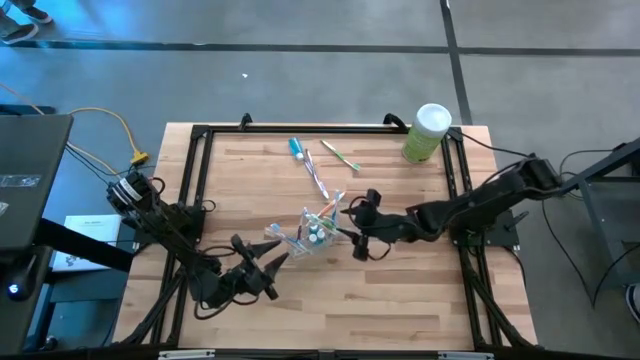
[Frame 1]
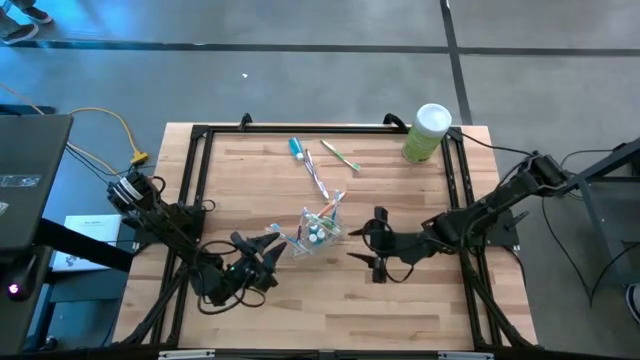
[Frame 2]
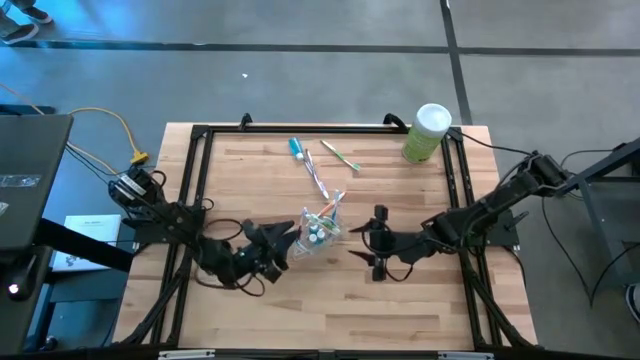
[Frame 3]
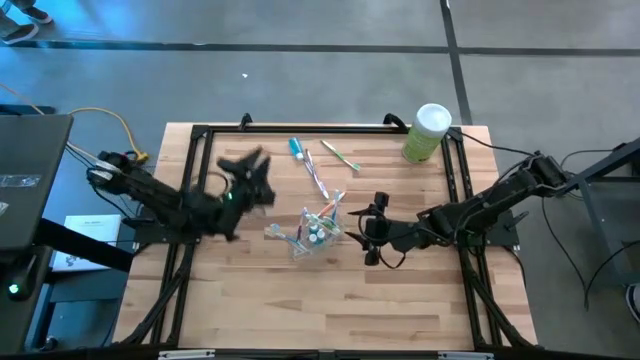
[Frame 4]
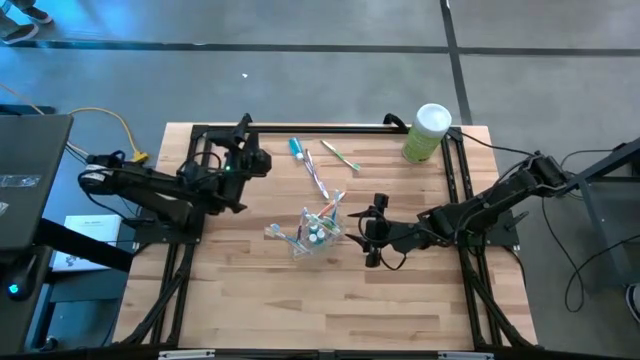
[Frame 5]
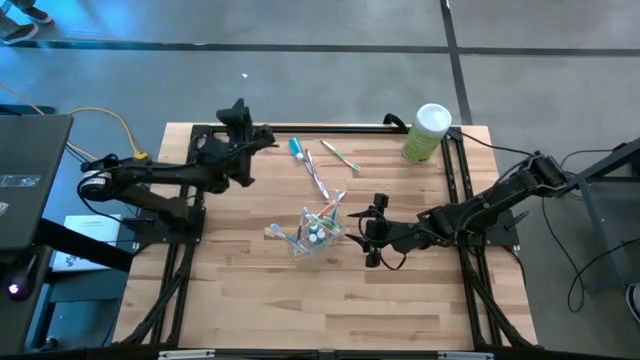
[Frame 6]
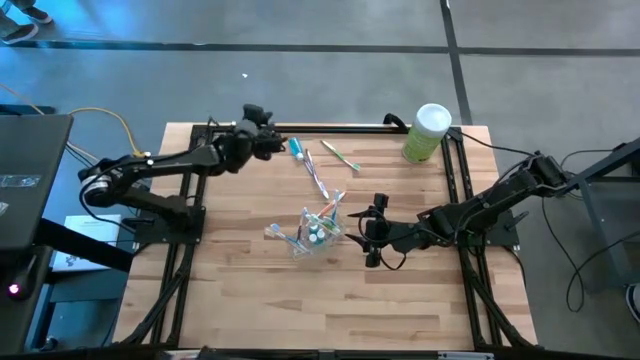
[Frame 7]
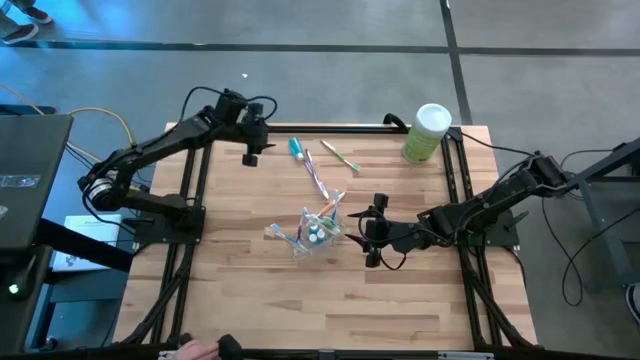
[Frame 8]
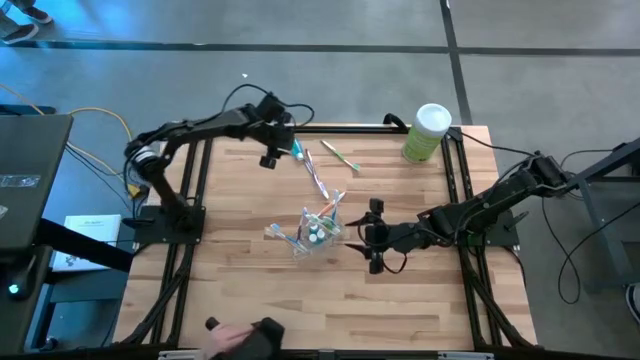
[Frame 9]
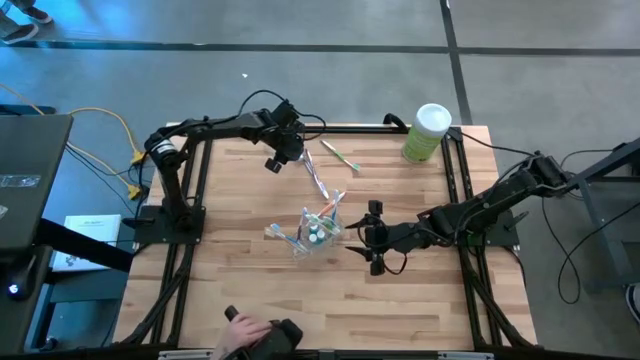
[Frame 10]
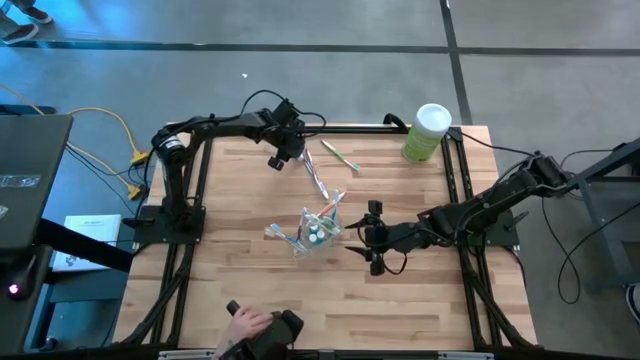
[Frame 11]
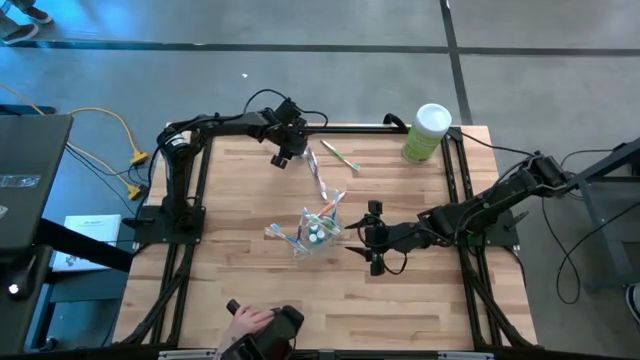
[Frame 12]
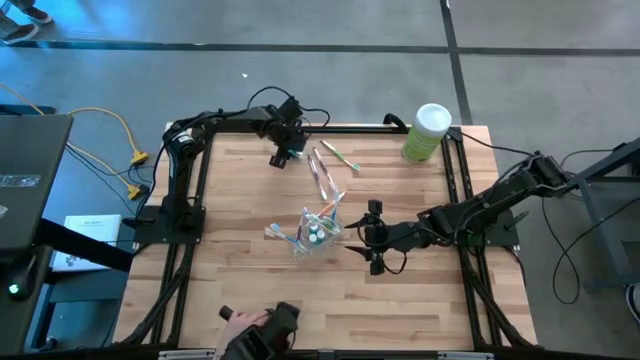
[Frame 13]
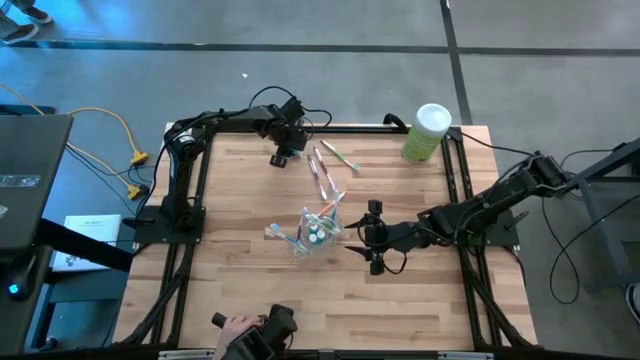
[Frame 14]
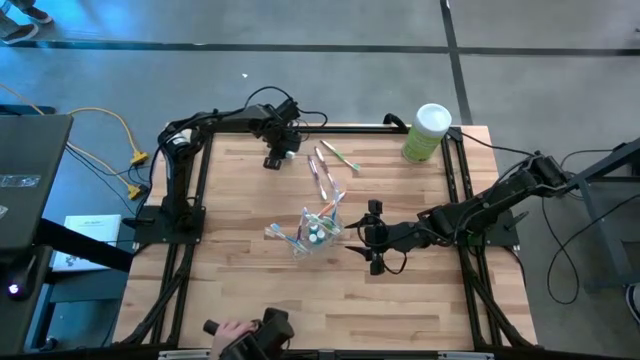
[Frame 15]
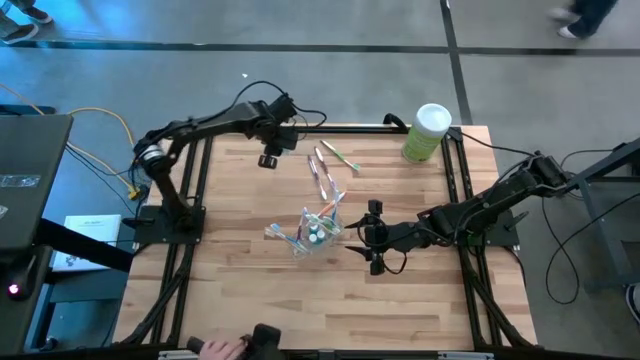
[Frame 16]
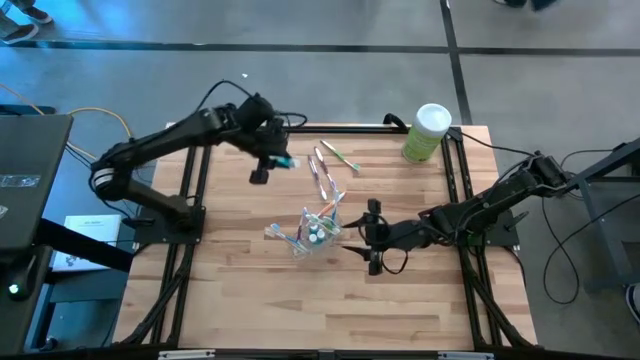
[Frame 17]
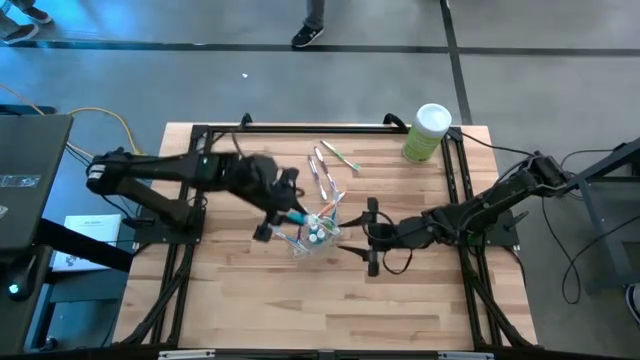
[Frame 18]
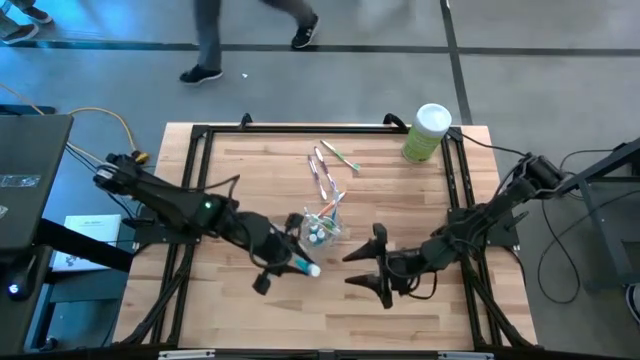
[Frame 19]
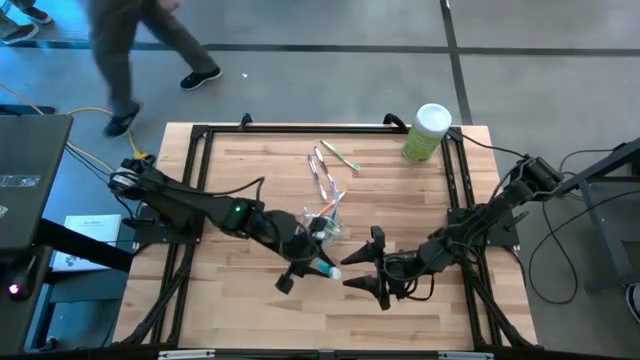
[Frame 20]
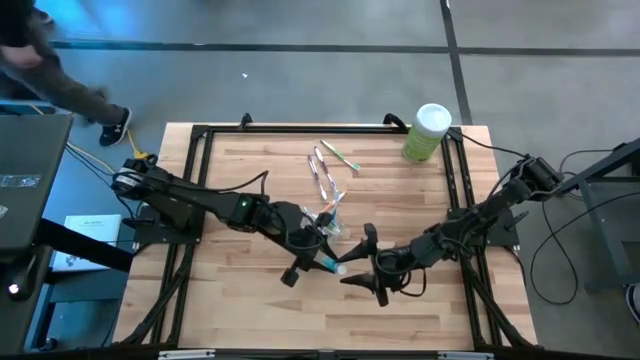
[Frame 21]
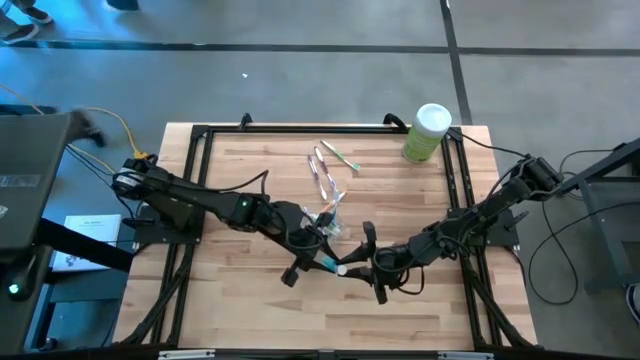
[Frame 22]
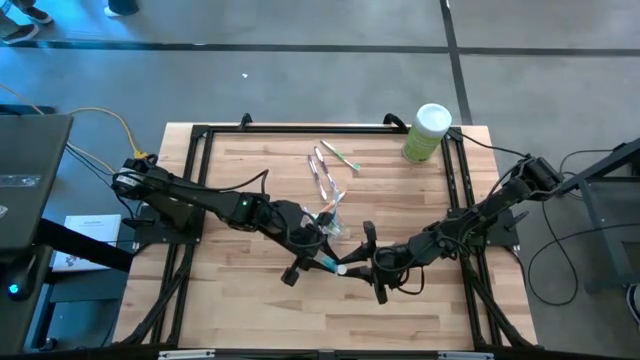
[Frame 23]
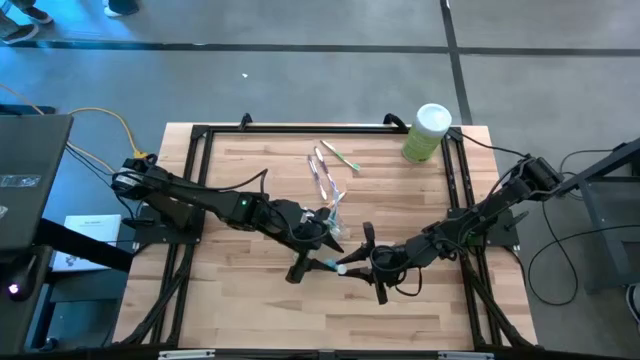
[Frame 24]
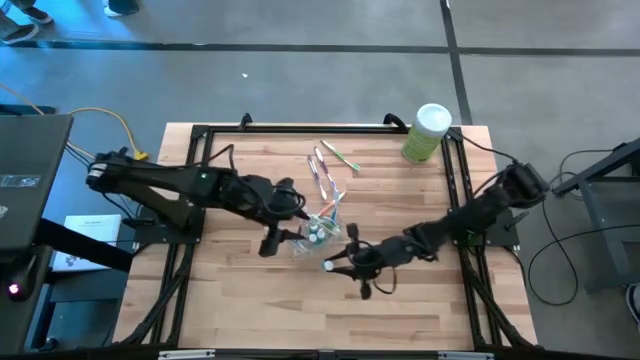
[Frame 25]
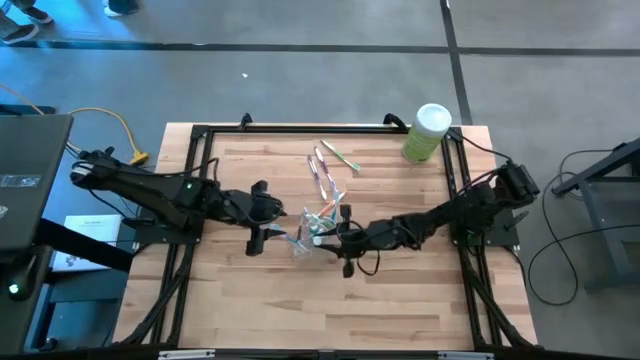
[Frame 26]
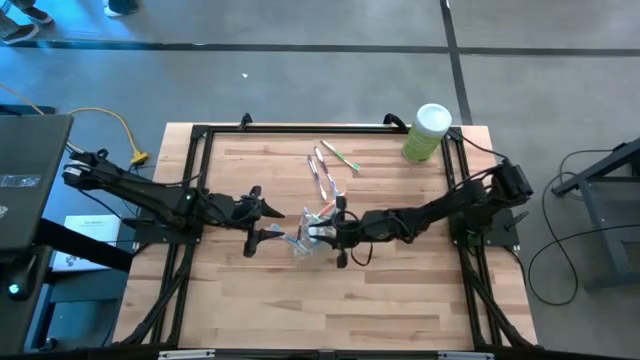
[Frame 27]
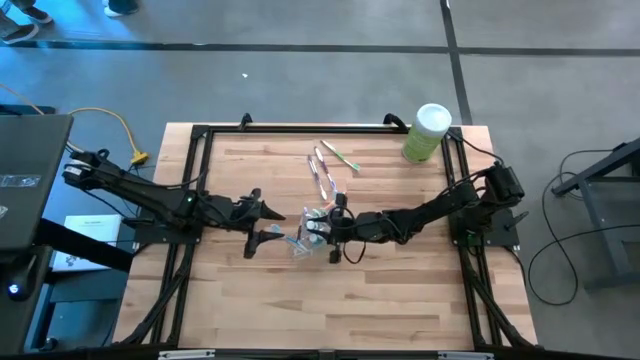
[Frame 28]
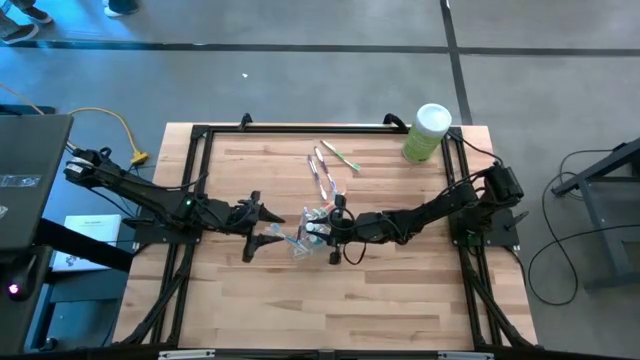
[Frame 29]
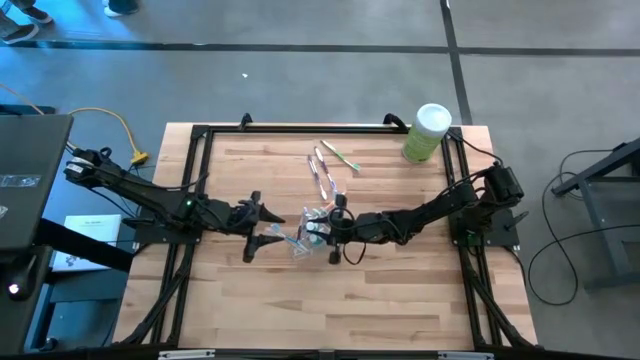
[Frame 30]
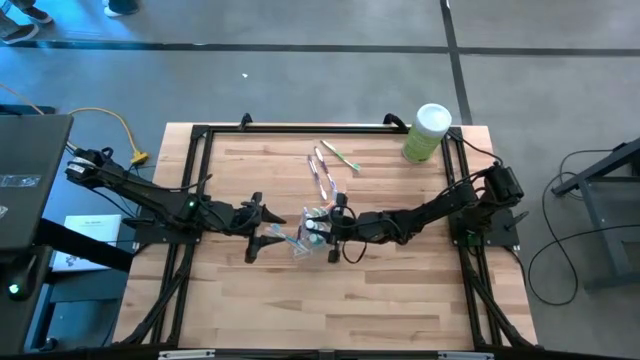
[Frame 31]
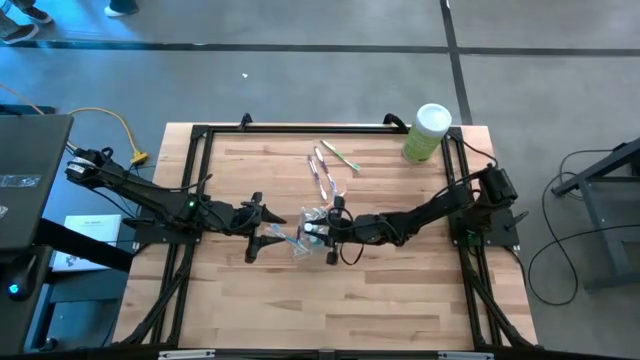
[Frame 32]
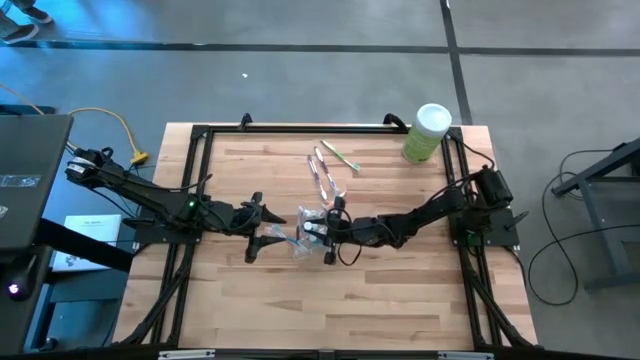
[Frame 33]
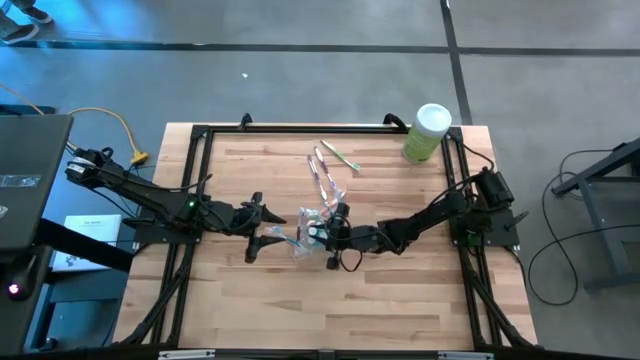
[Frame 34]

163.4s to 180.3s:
Task: Pick & Place toothbrushing station
Put the blue mouthwash into the transparent organizer

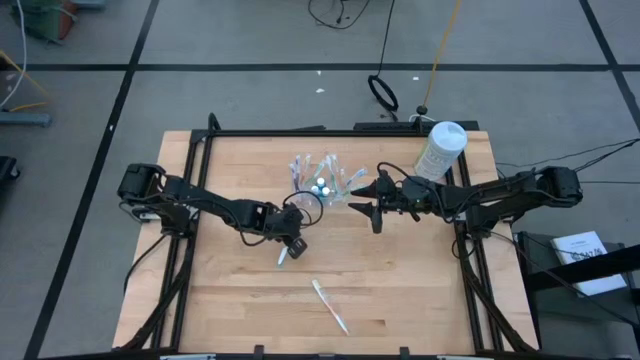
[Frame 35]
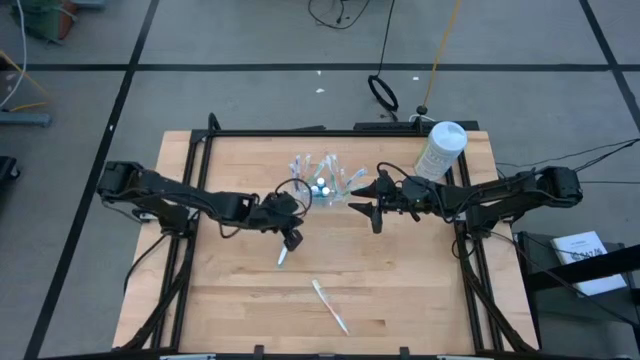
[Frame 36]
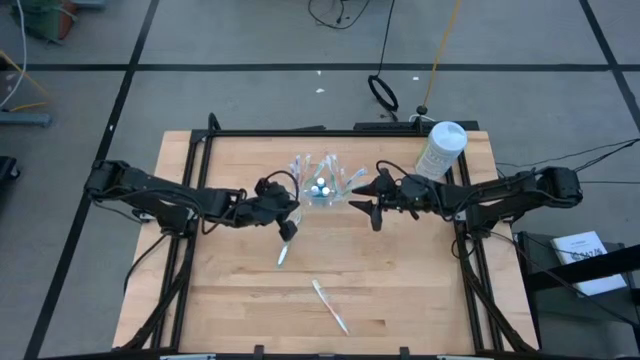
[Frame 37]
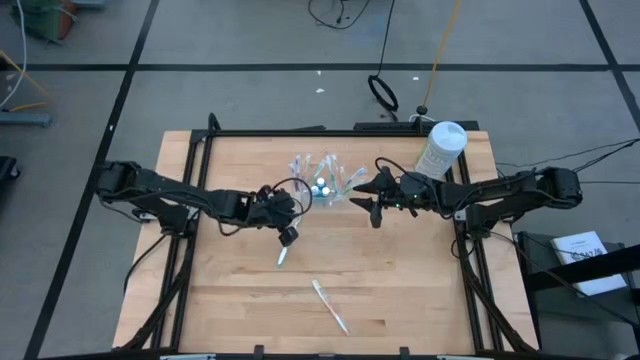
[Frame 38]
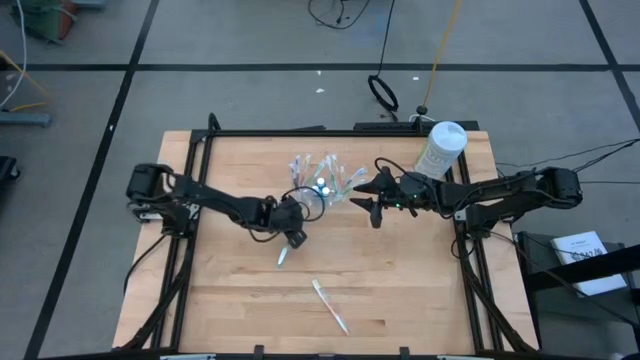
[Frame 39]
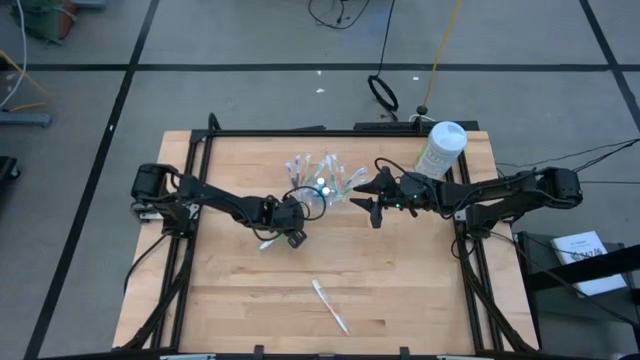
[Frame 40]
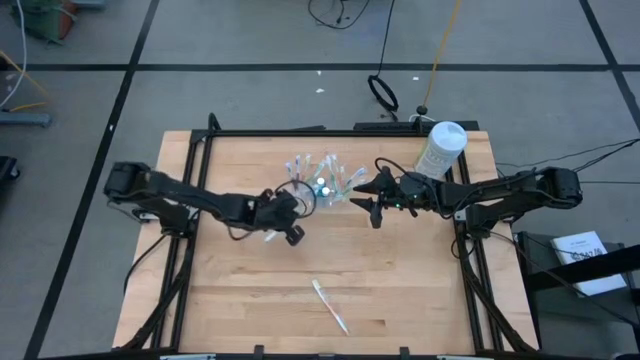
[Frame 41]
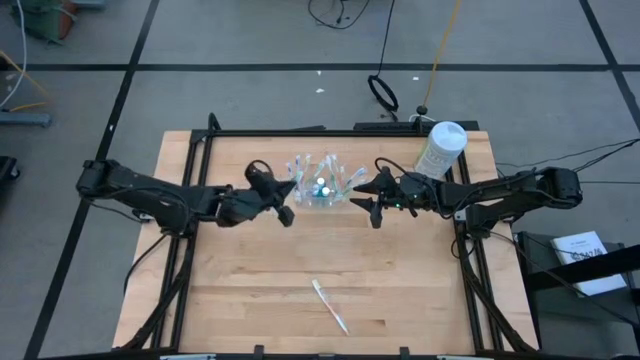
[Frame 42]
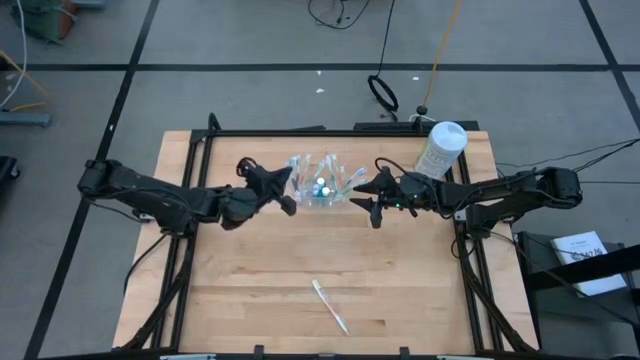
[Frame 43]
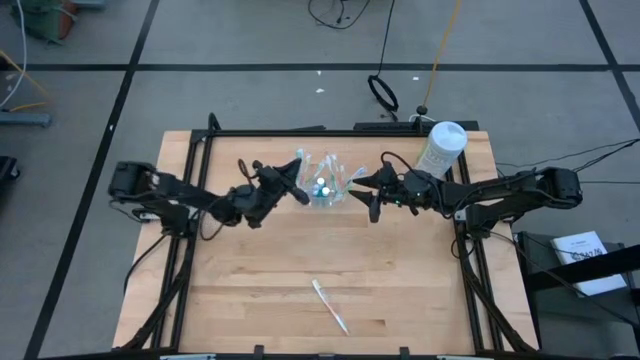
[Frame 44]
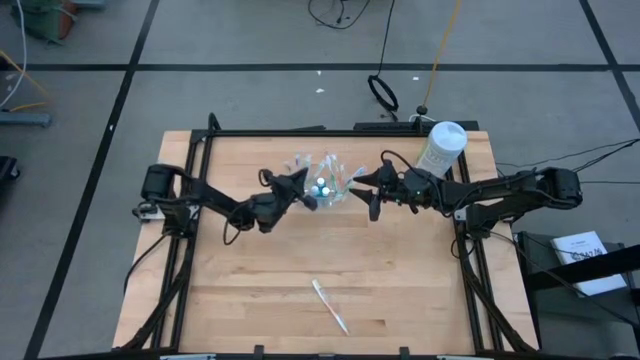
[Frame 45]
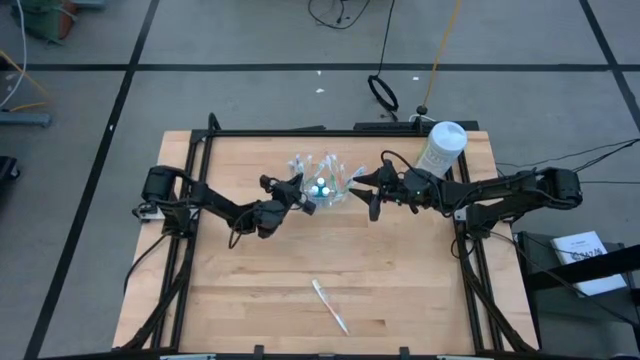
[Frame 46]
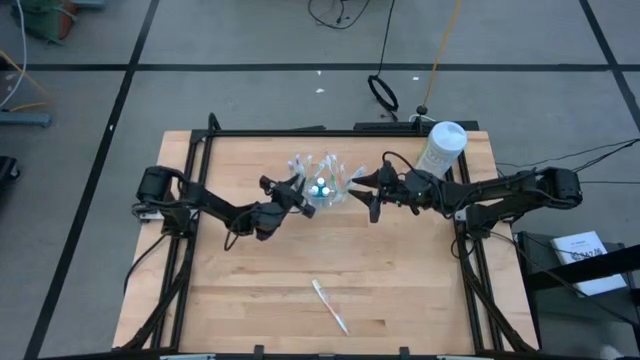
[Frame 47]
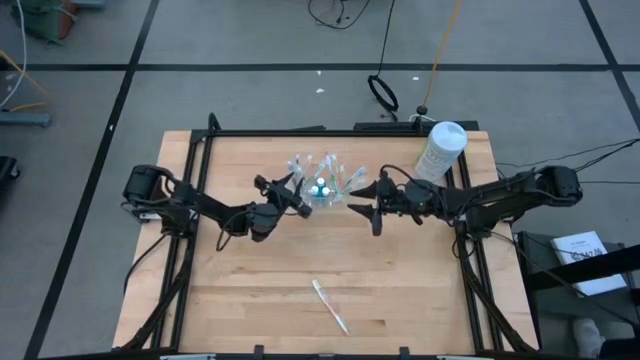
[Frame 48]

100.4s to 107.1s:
Task: Pick & Place Toothbrushes
Put the green toothbrush into the transparent organizer
